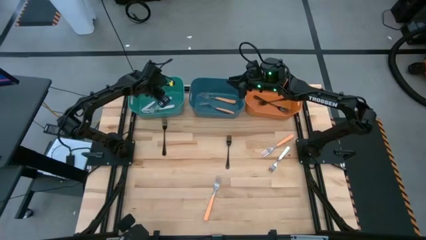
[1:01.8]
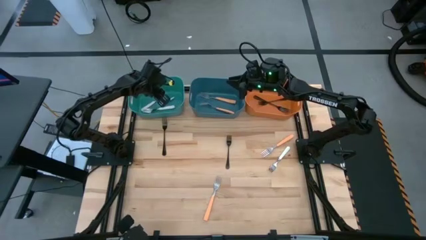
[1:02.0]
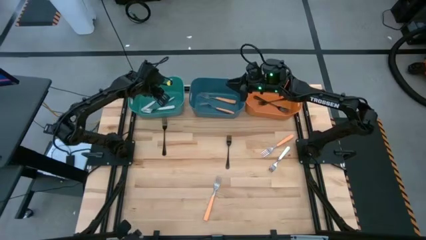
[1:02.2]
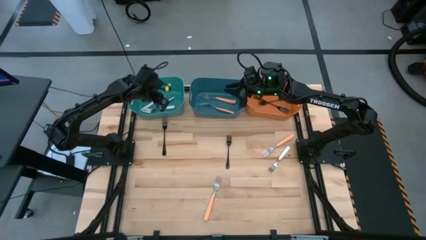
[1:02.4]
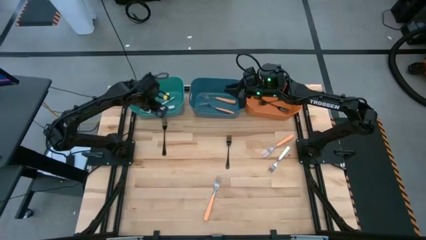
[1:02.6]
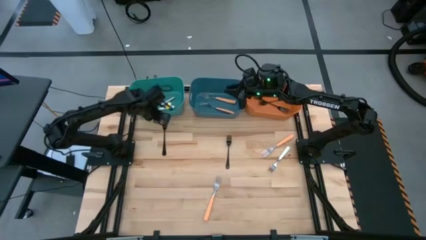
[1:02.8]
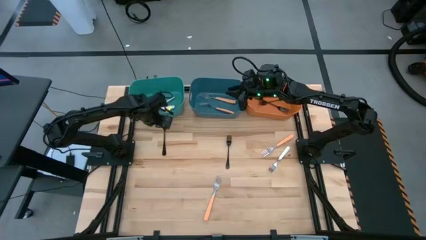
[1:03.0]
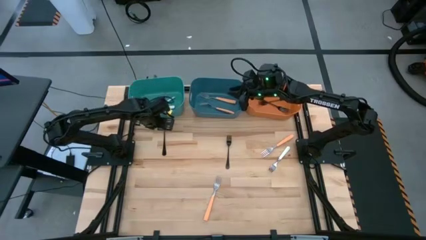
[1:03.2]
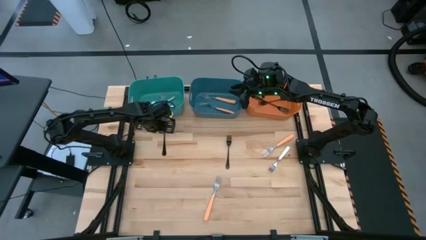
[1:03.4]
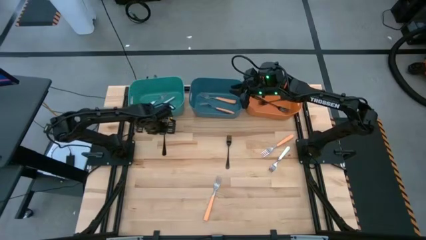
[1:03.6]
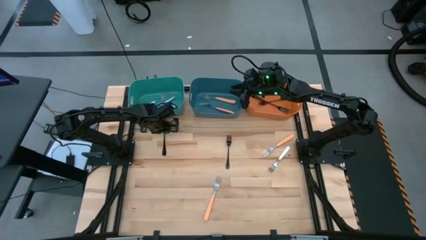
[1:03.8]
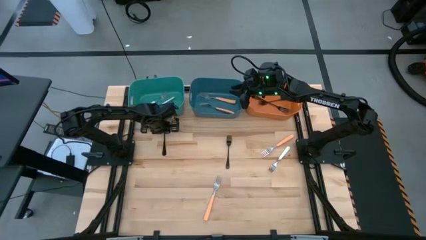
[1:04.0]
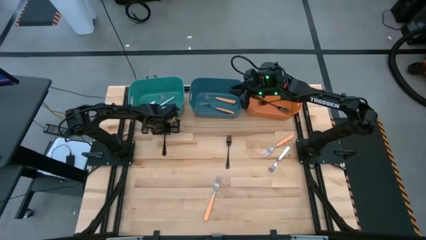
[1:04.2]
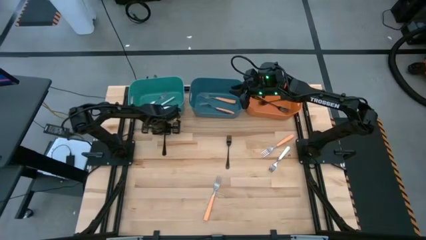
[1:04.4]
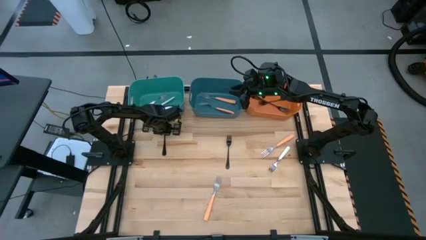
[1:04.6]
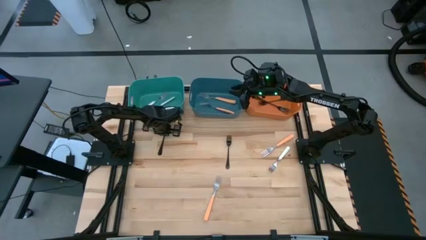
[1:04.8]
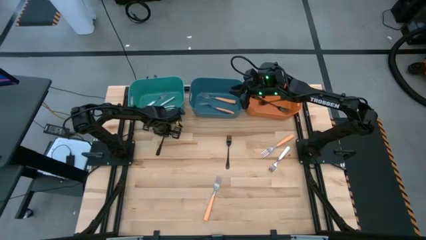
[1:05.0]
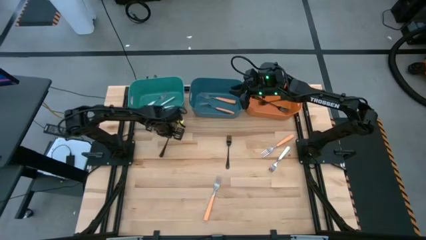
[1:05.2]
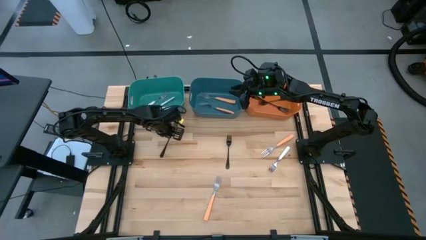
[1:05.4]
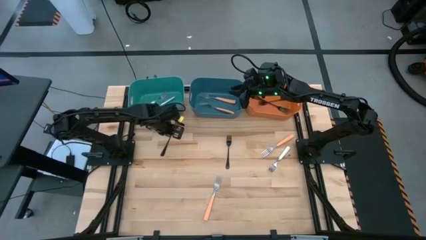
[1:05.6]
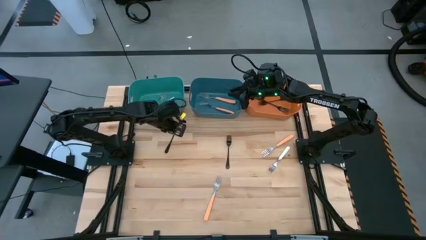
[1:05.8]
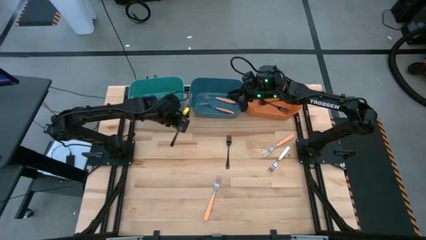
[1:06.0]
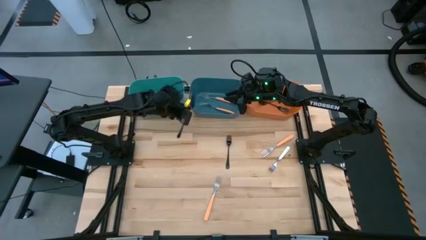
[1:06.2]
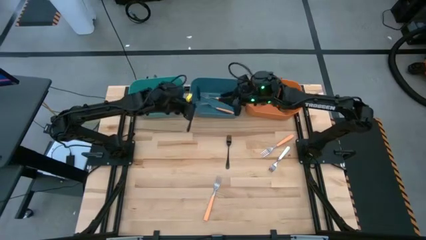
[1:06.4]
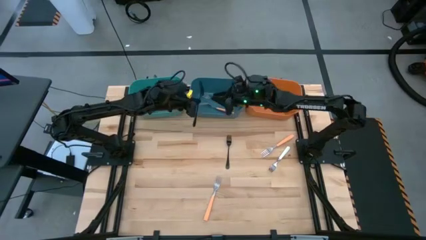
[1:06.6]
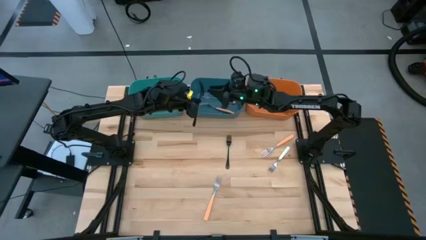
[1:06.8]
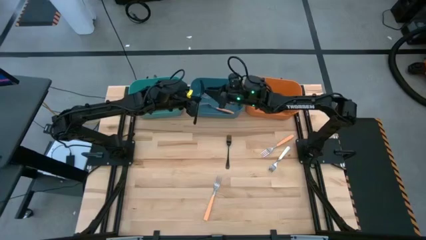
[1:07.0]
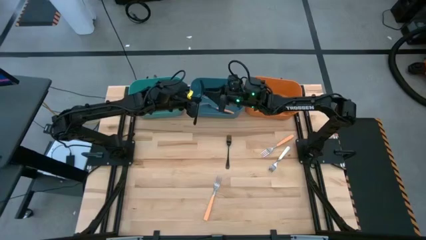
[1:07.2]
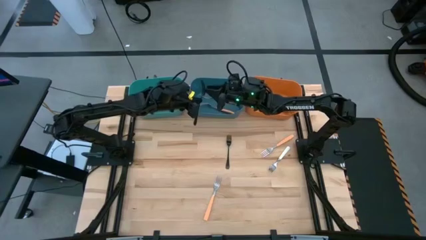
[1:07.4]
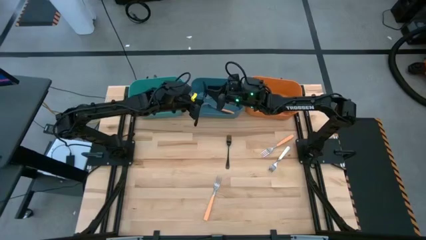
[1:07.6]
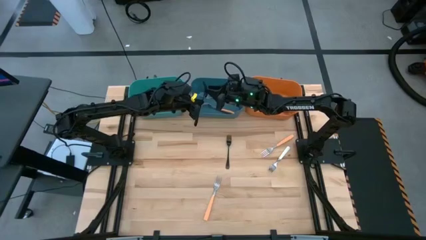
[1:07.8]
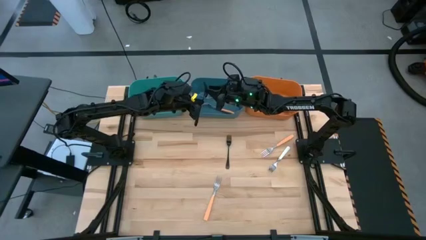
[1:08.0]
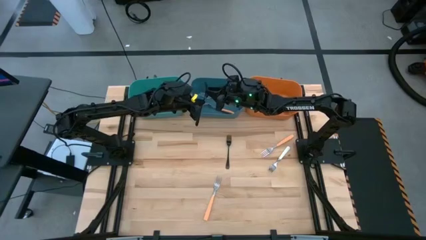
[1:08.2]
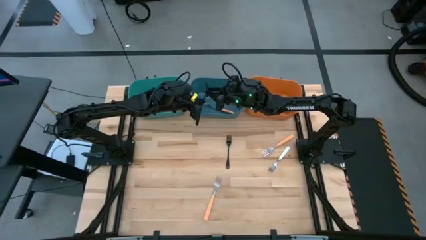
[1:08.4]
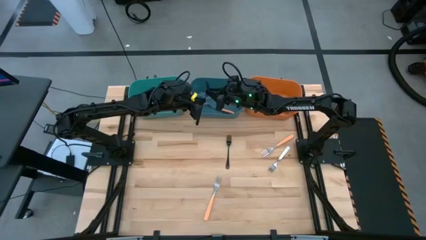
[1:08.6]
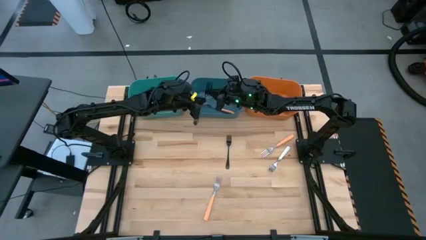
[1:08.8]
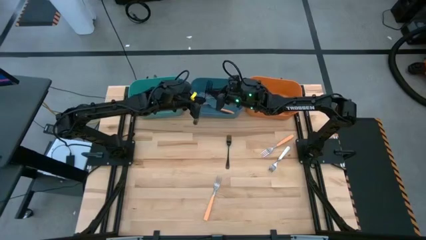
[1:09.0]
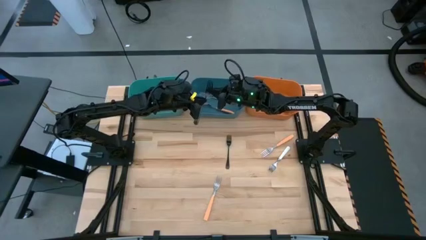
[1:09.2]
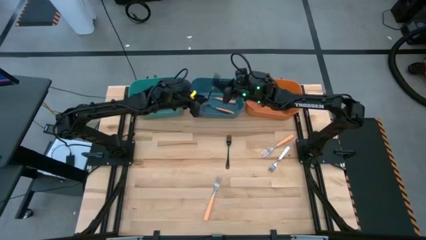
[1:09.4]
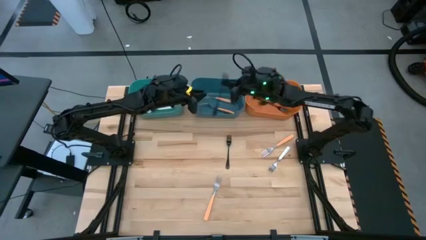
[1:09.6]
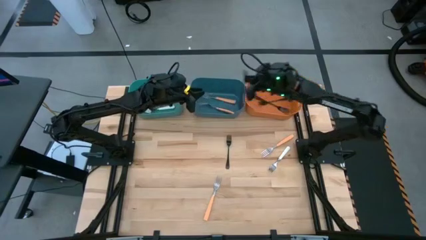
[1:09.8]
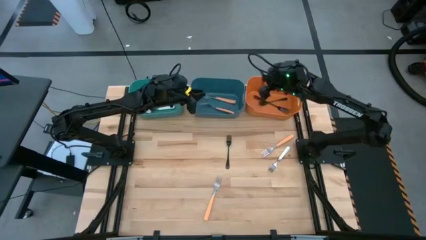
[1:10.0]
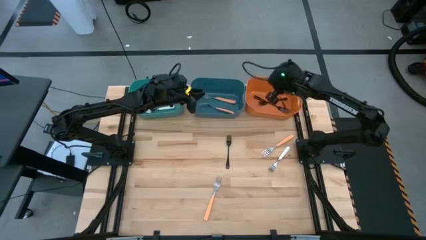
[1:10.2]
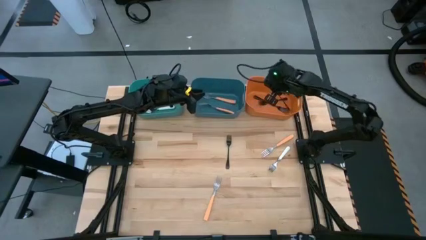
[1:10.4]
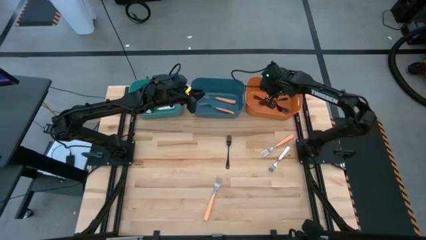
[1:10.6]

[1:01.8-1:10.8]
Task: Sort silverware by color (type)
Put the left black fork into the orange bin

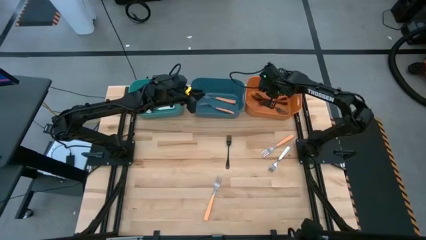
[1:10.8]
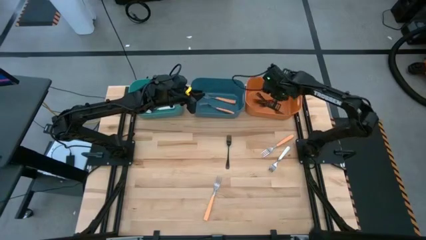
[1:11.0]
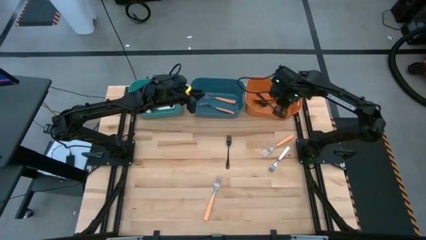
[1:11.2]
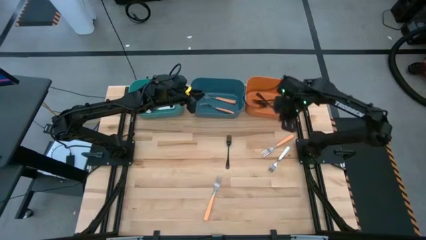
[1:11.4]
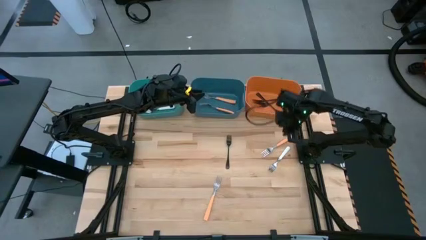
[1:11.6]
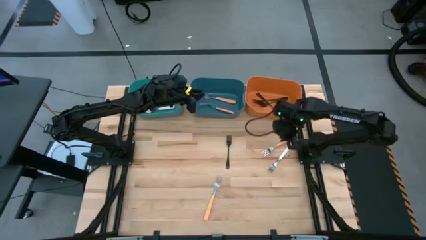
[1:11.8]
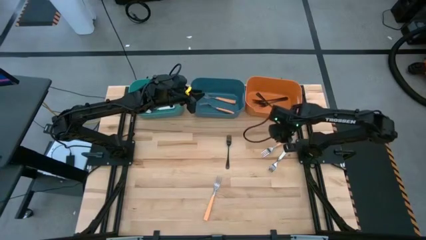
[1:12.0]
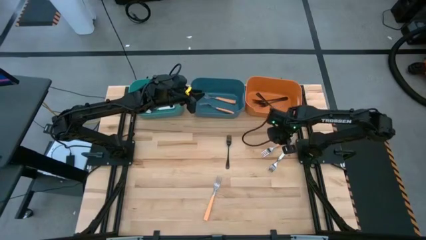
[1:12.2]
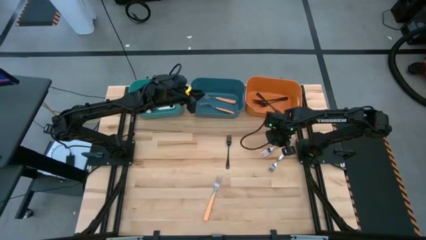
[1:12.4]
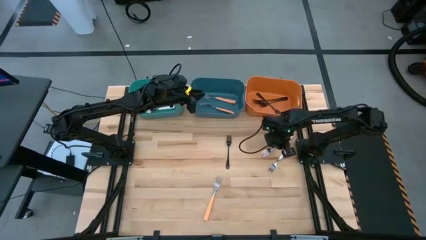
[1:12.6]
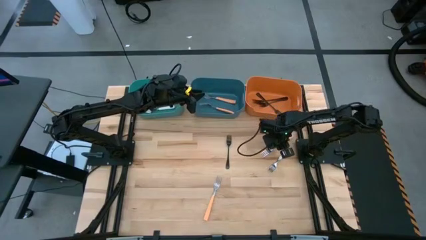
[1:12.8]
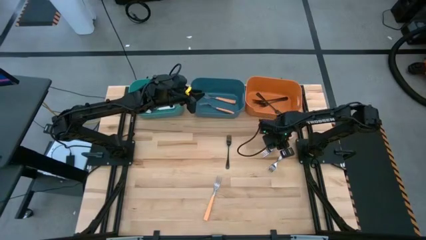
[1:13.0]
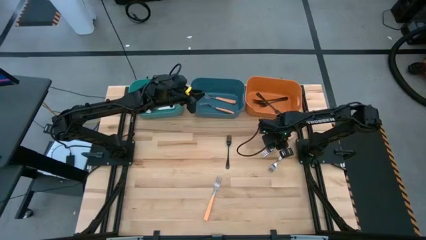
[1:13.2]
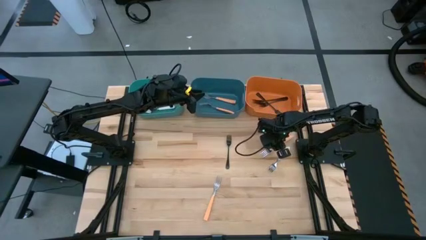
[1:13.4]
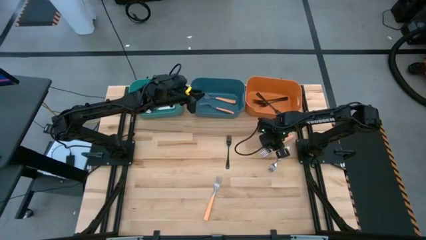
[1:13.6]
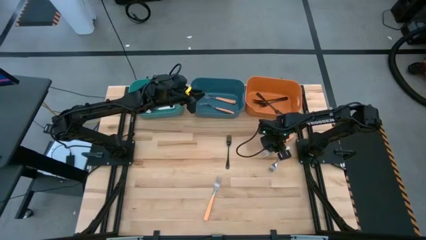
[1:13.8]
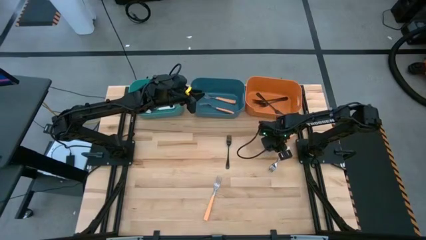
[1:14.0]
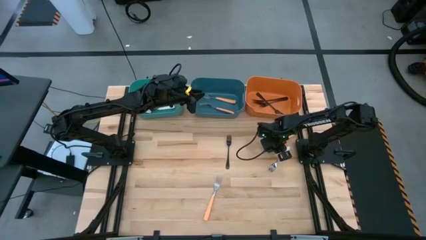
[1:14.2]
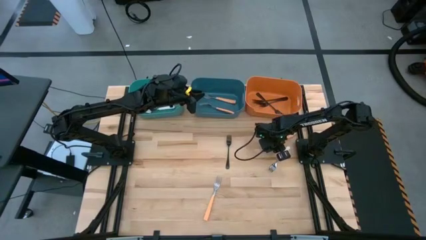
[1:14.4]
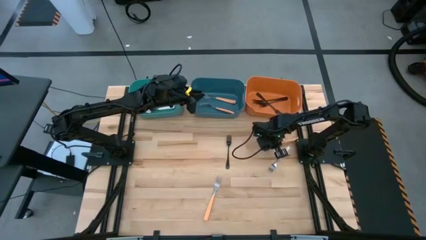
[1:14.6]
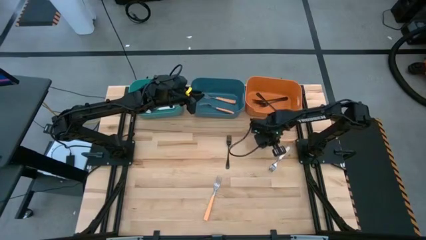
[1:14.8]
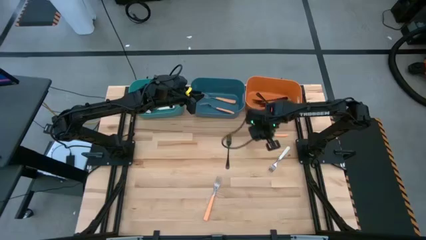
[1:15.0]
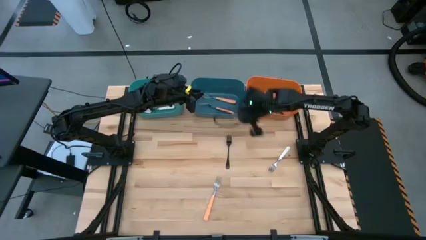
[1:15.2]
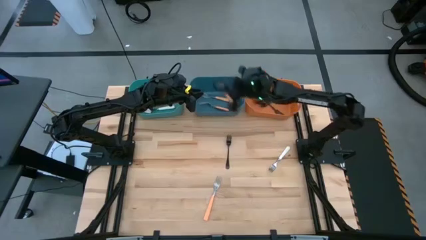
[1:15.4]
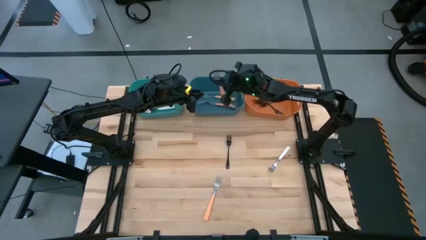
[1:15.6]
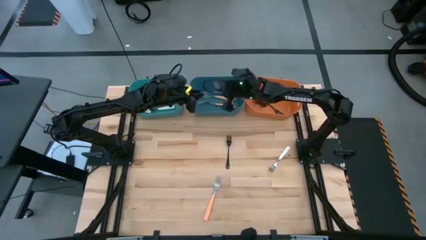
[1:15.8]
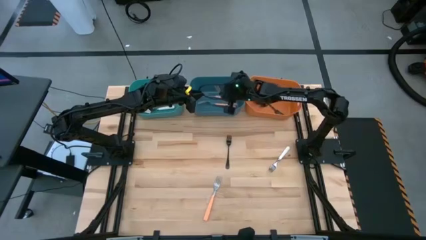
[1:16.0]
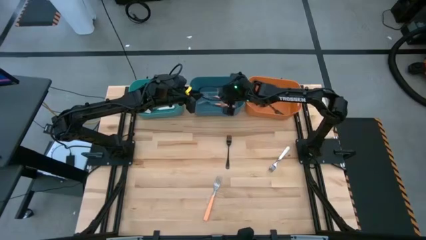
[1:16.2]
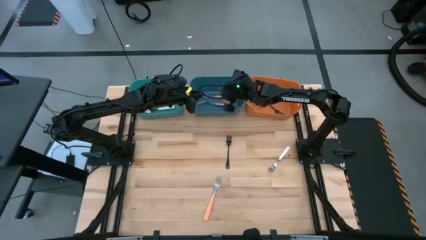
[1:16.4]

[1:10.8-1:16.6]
Put the top orange fork into the blue bin

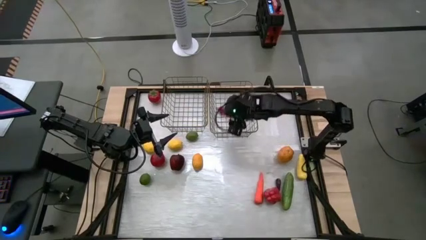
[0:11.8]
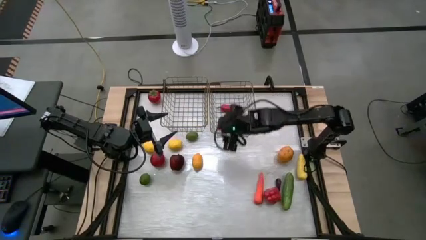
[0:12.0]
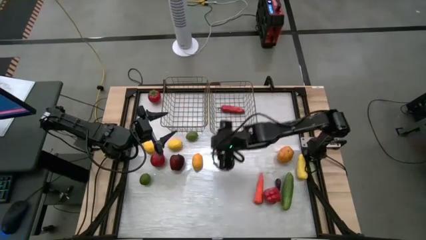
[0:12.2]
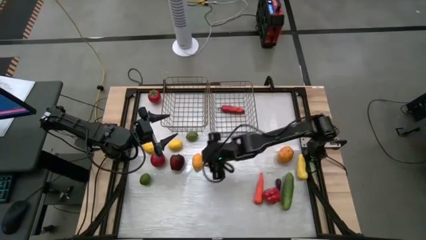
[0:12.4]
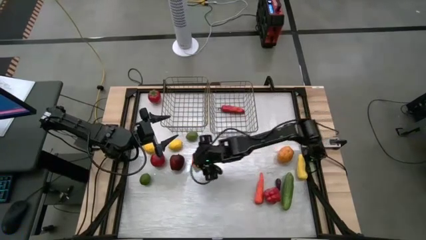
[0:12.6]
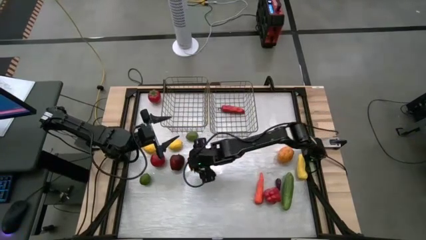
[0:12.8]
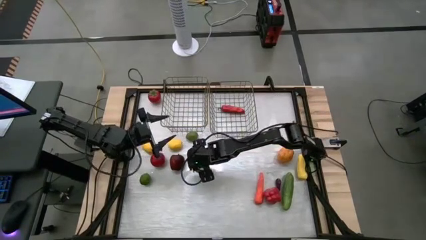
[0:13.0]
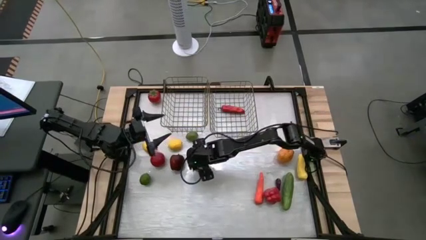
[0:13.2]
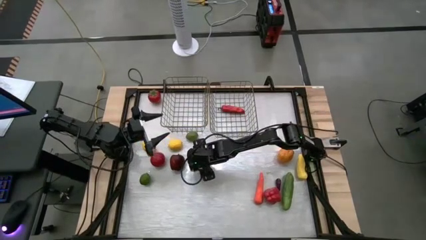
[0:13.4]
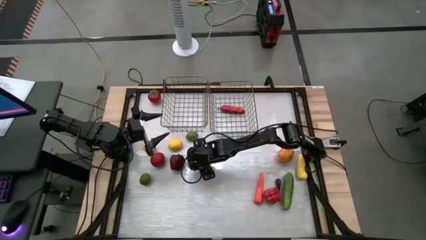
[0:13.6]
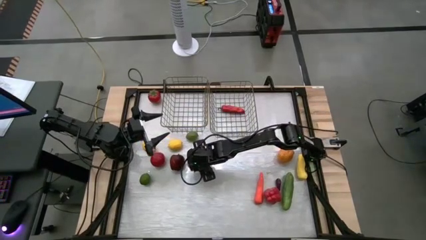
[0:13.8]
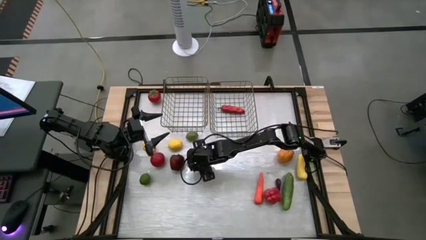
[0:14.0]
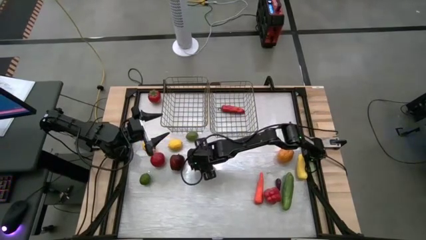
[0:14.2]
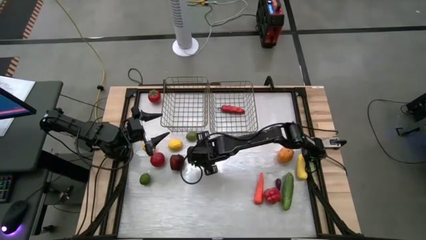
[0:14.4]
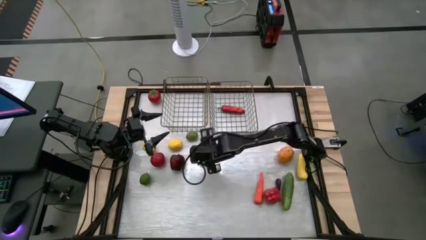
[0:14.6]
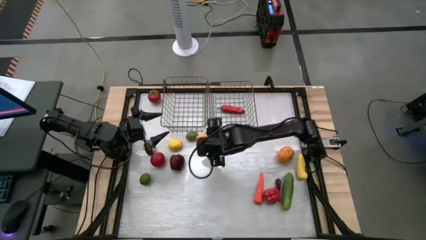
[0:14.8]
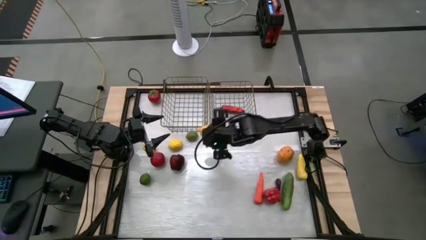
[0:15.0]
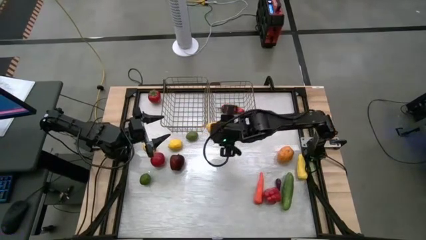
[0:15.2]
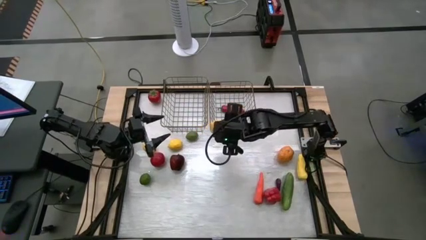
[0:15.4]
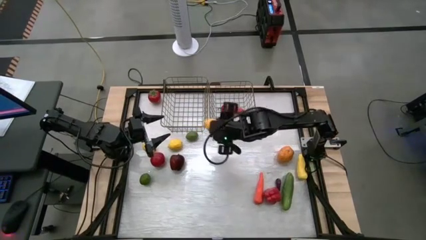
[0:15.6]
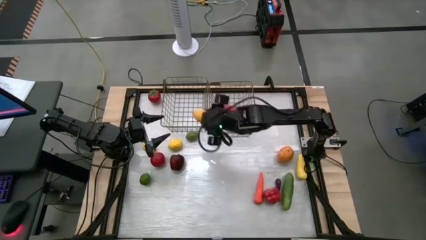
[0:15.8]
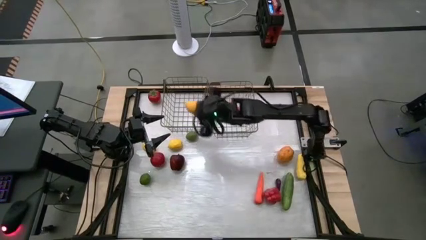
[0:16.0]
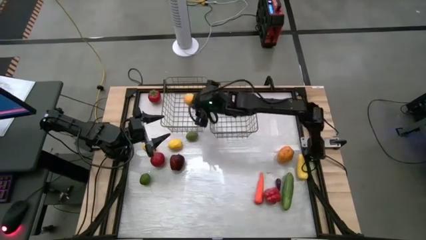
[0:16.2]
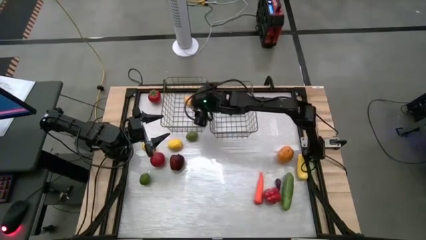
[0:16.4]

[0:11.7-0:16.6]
Task: Sort produce into baskets
Put the right lemon into the left wire basket
